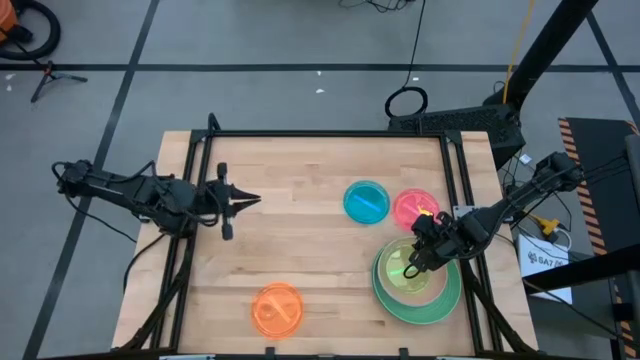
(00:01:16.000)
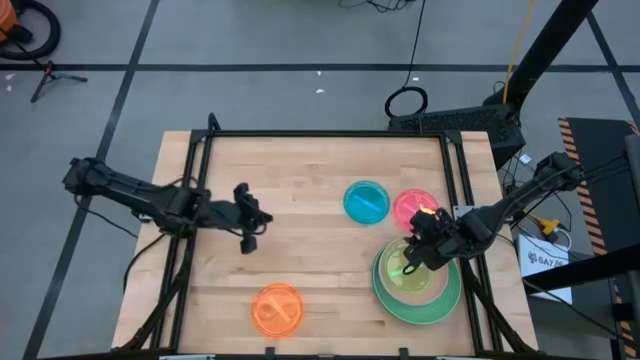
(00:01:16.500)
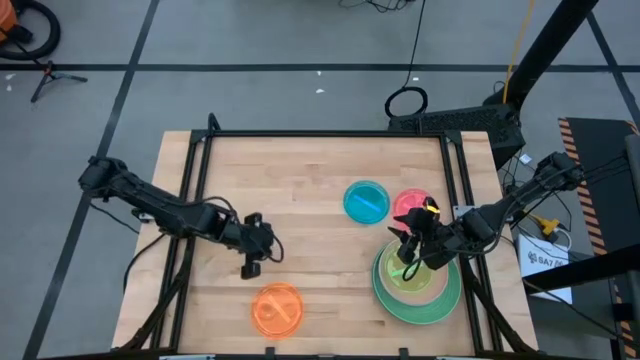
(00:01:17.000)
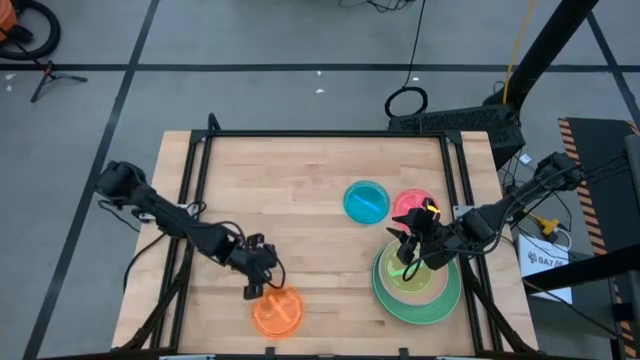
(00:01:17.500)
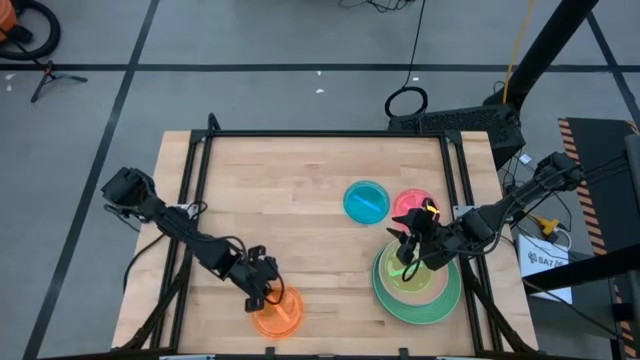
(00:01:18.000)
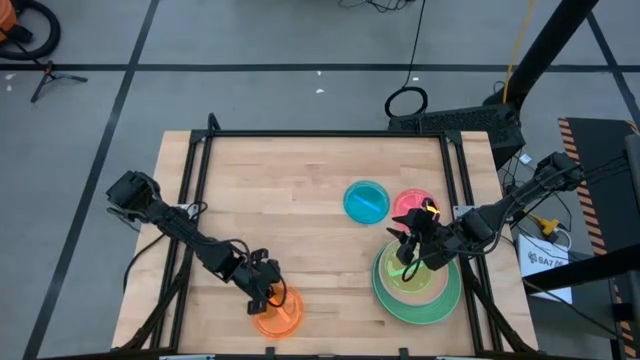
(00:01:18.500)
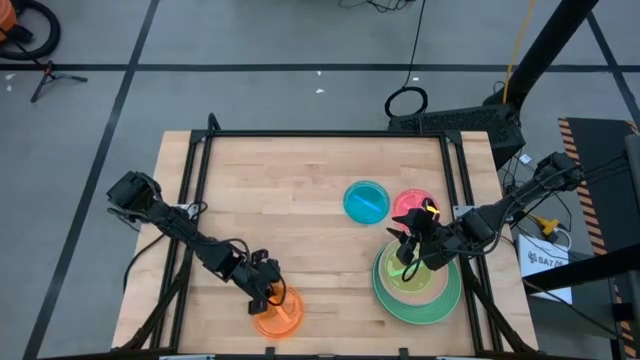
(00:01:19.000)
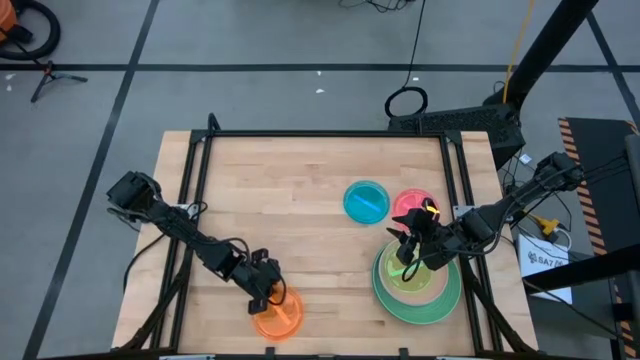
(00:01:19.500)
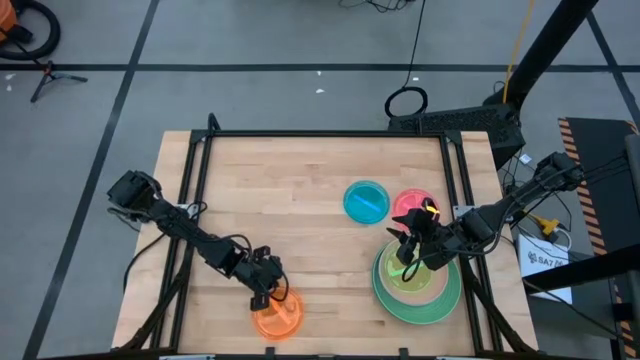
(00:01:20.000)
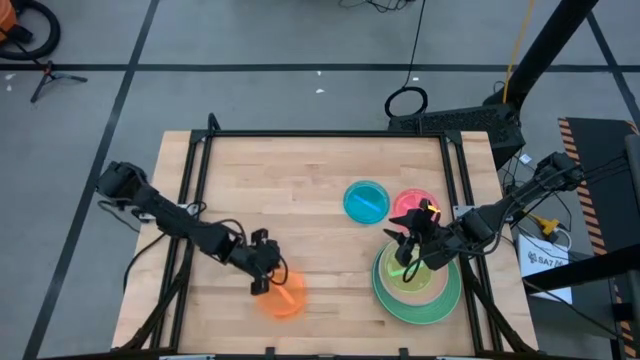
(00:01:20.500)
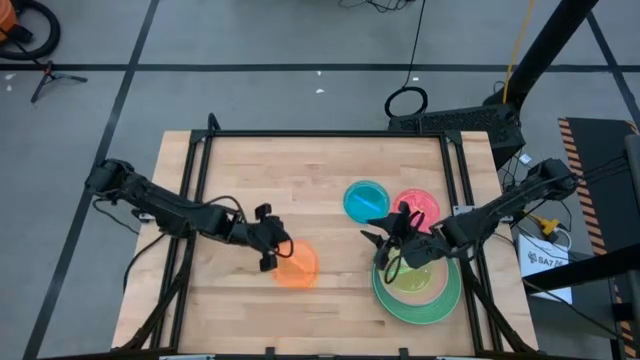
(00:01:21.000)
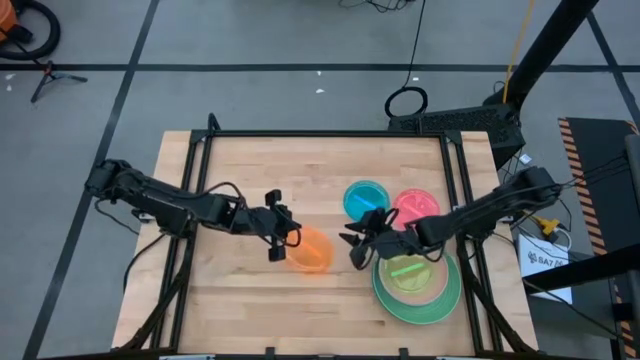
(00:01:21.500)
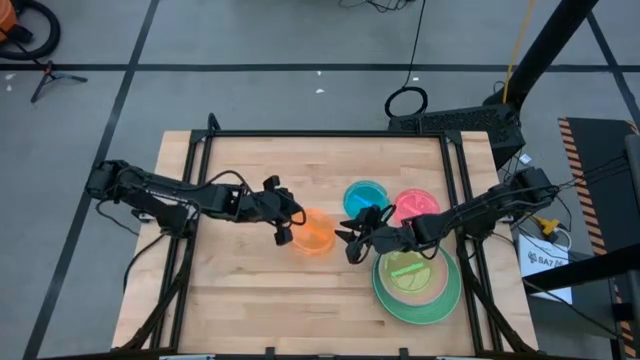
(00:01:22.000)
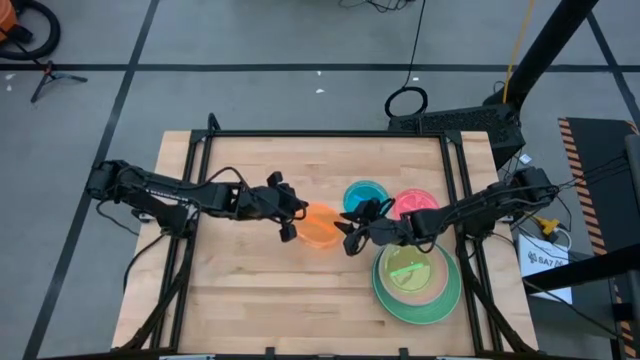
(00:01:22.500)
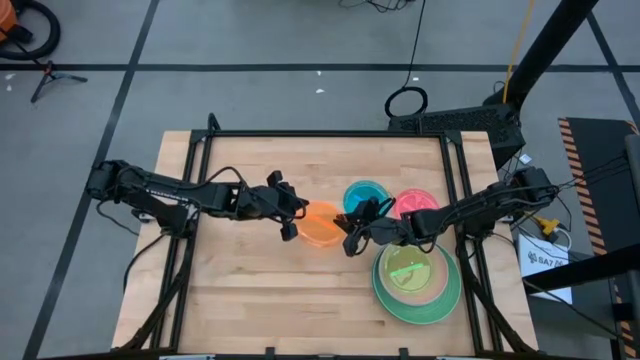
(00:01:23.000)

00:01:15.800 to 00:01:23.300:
Task: Stack plastic plates
Stack the orange transparent plate on top of the green transparent plate

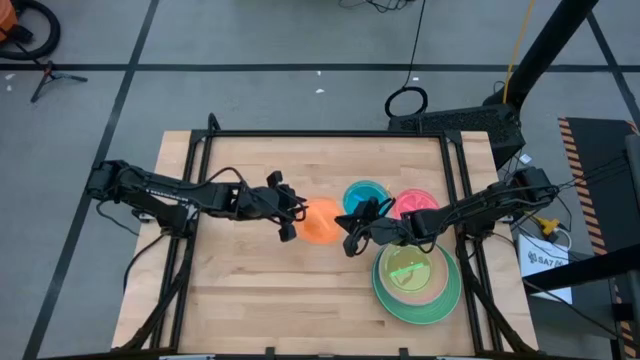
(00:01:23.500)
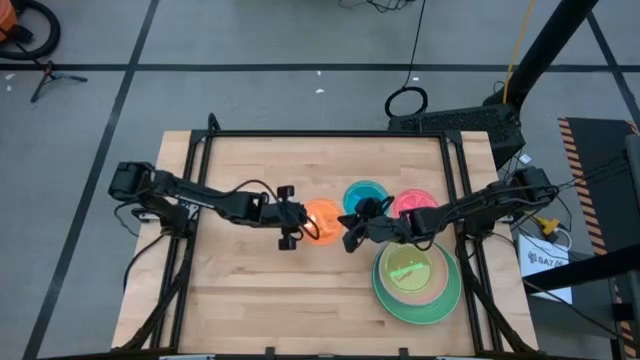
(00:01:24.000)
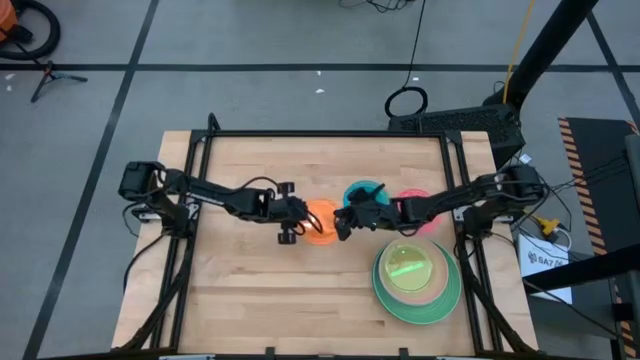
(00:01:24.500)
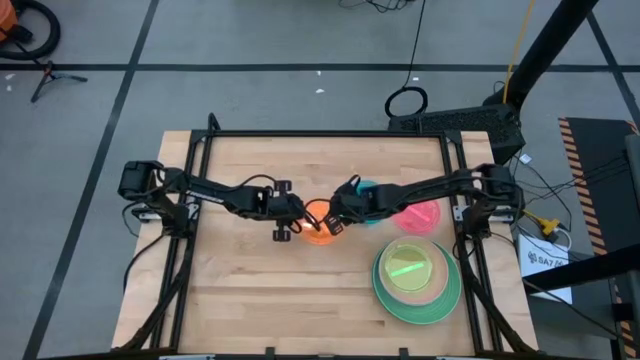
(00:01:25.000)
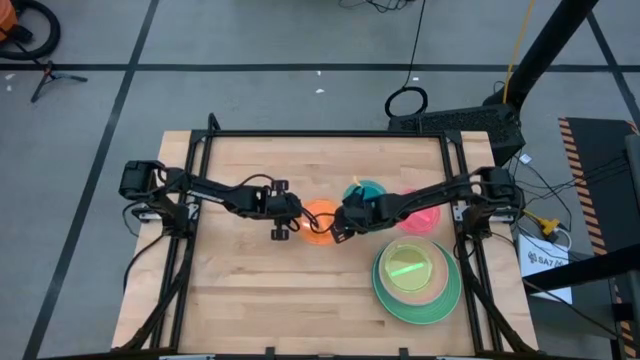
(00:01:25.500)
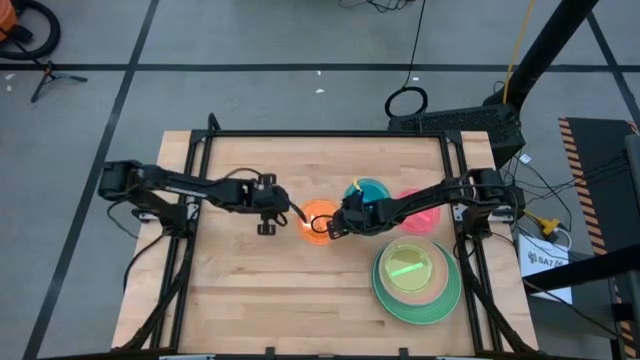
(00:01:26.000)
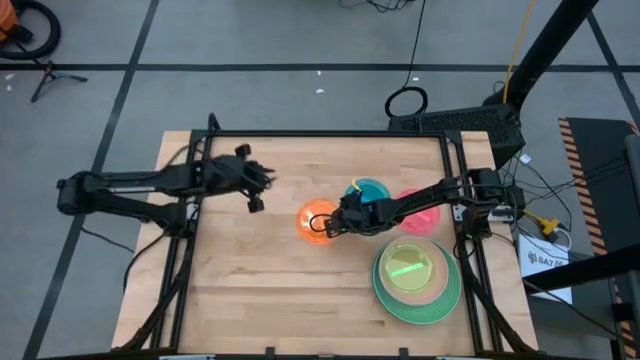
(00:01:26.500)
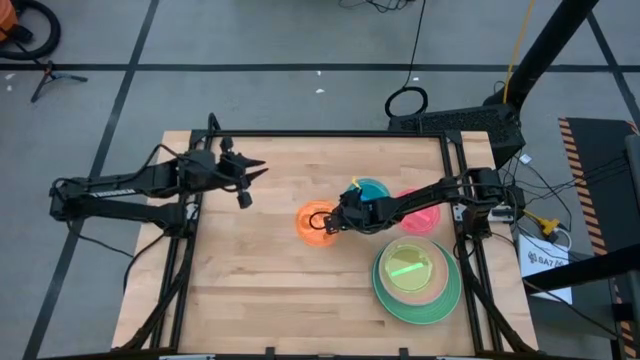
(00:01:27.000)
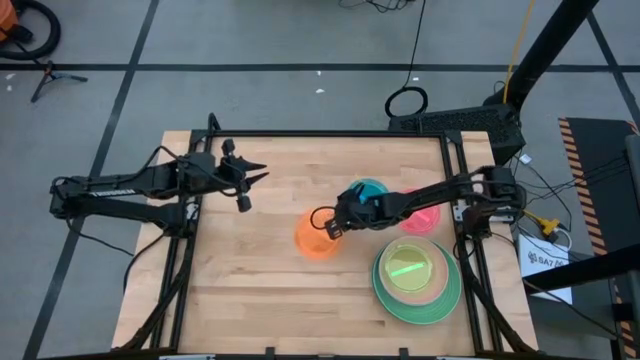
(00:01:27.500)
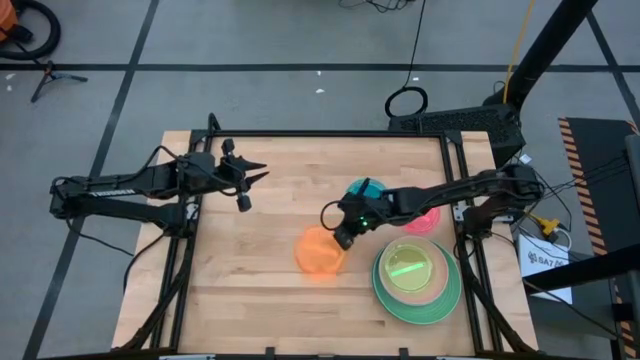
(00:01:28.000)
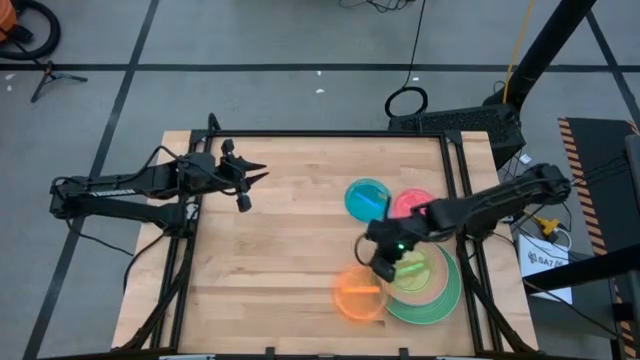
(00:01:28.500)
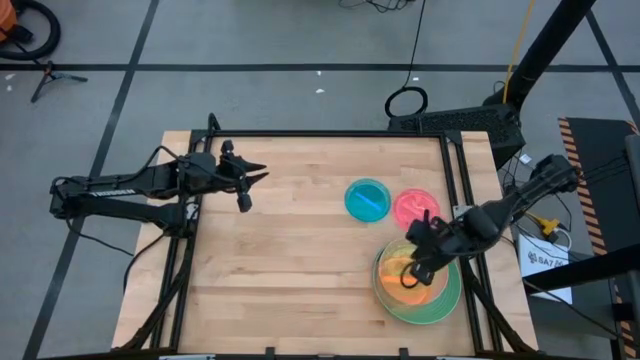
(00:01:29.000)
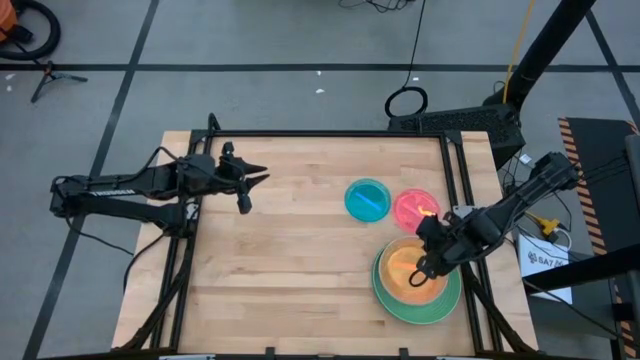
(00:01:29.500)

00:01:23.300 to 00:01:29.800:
Stack the orange transparent plate on top of the green transparent plate

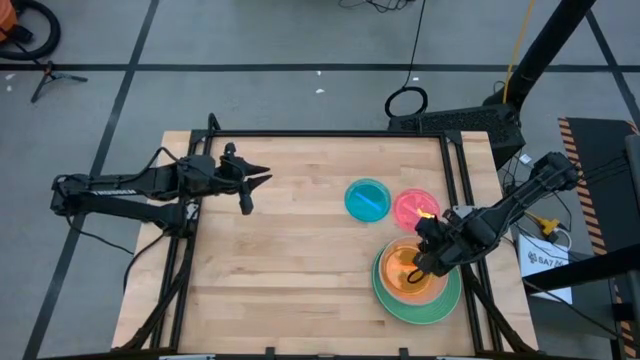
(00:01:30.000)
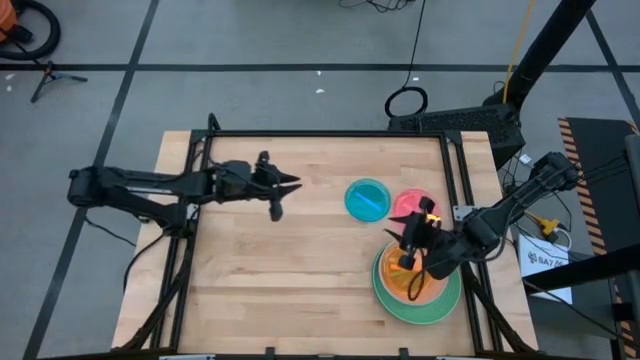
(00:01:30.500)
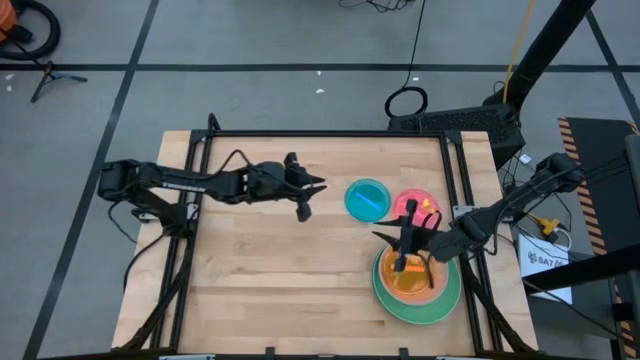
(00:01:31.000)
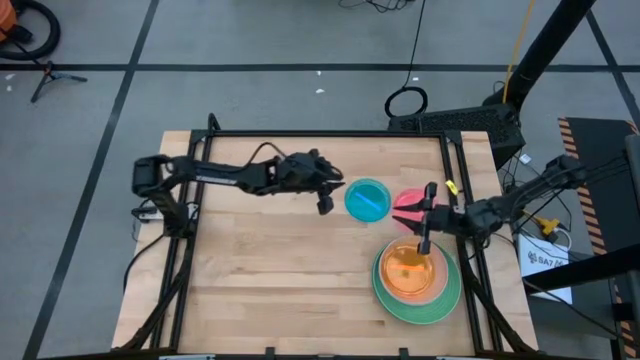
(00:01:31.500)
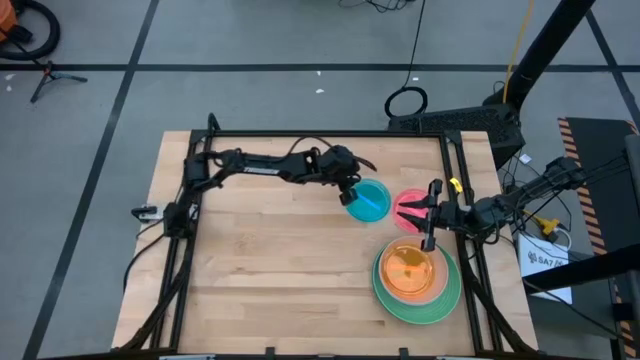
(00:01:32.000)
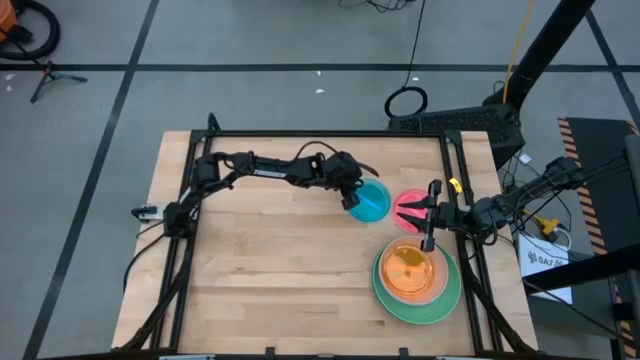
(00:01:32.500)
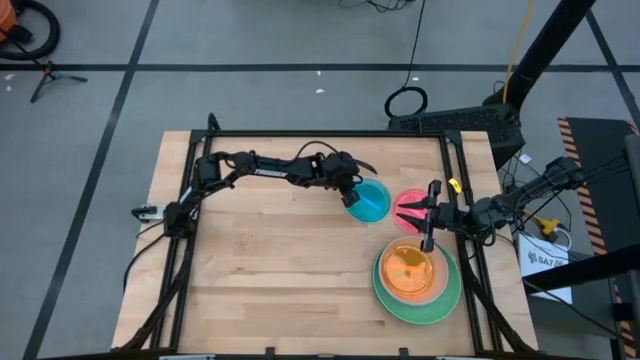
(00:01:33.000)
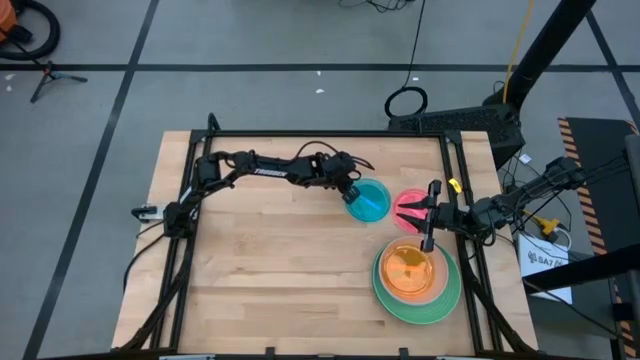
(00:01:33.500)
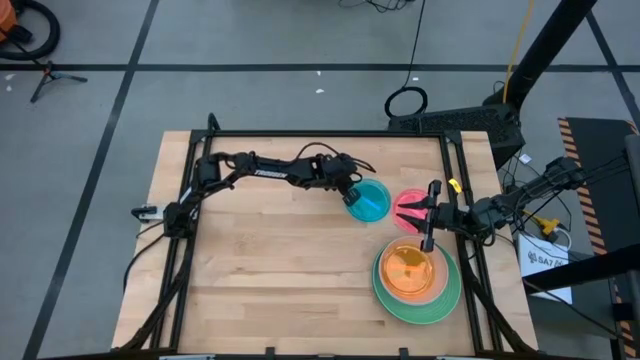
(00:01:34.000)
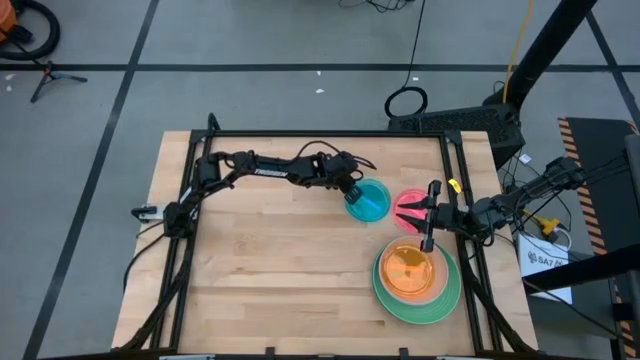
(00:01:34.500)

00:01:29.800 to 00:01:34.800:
Stack the blue transparent plate on top of the orange transparent plate
